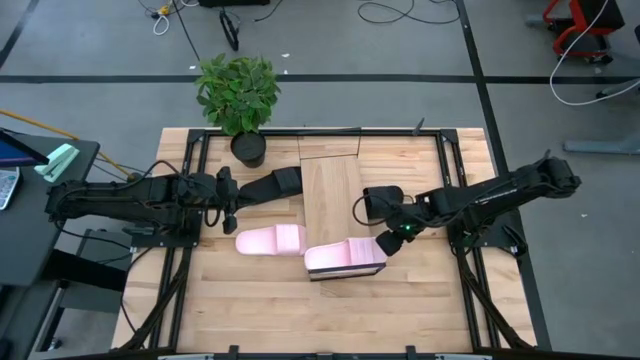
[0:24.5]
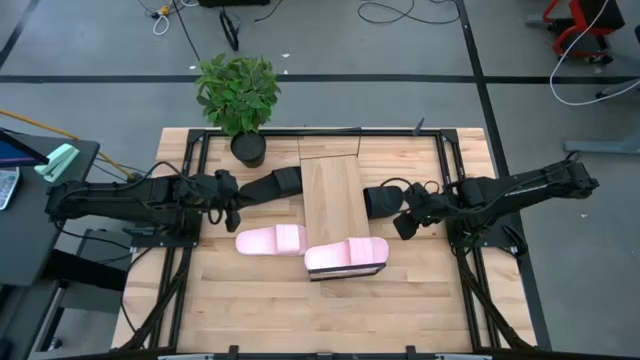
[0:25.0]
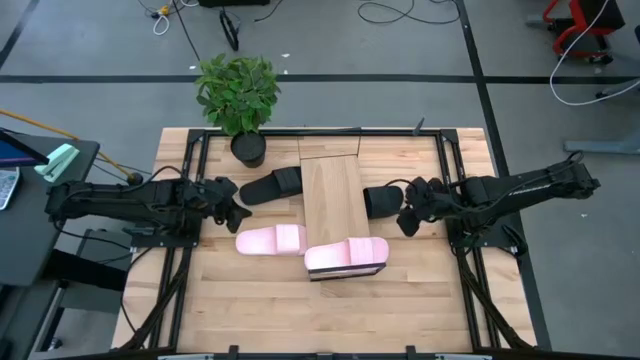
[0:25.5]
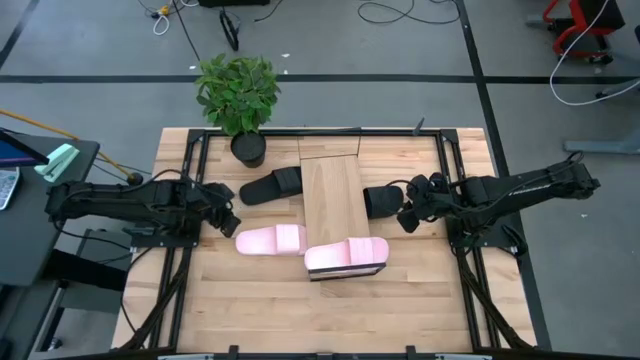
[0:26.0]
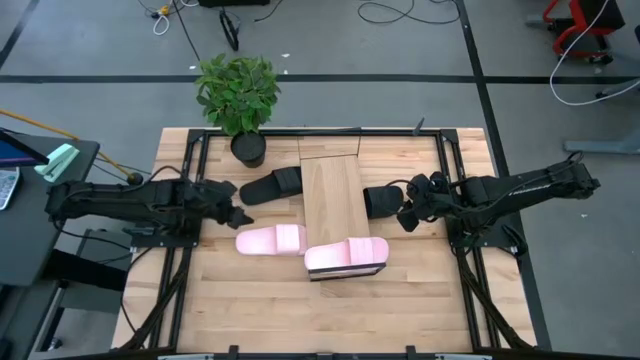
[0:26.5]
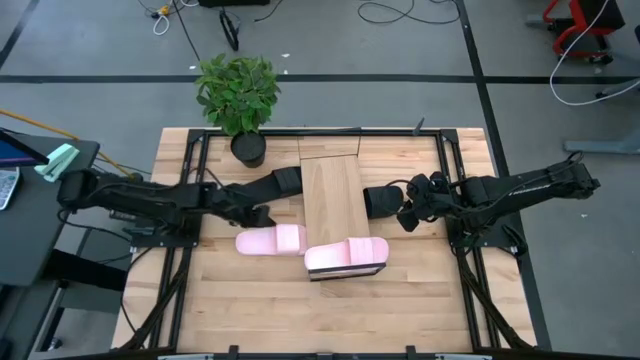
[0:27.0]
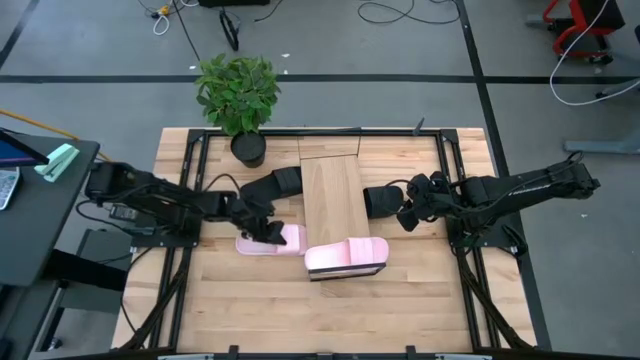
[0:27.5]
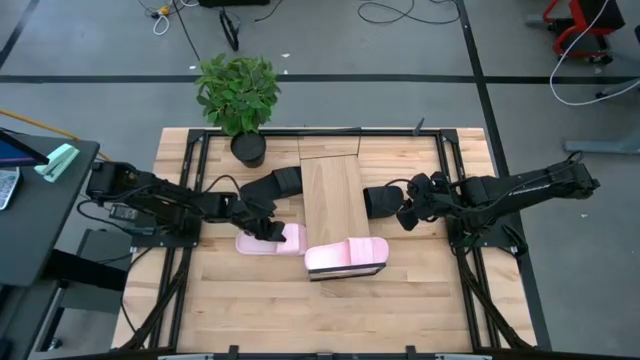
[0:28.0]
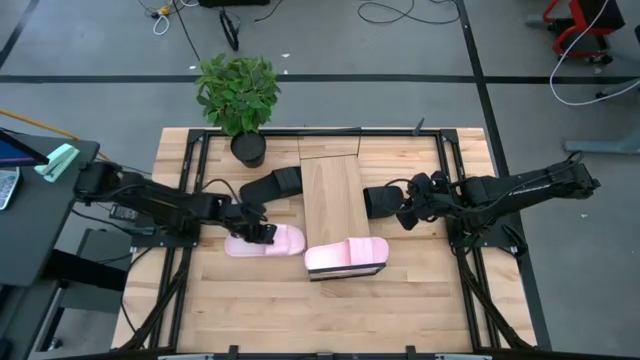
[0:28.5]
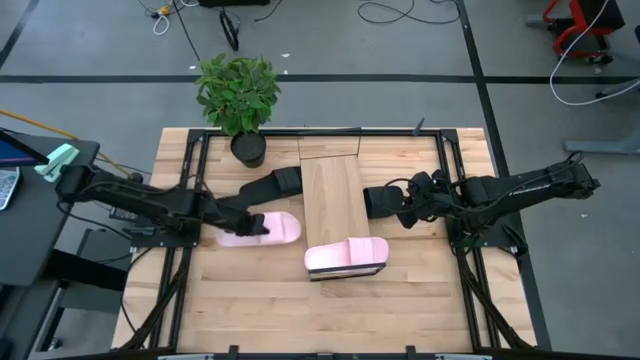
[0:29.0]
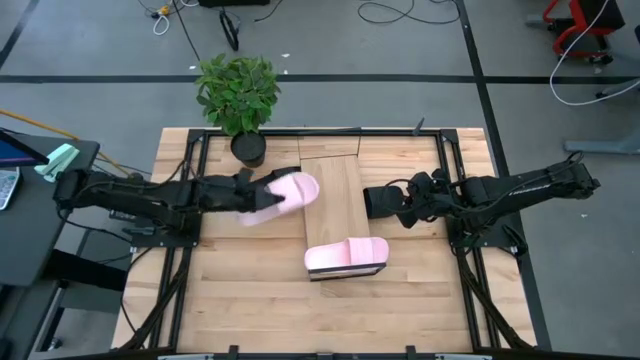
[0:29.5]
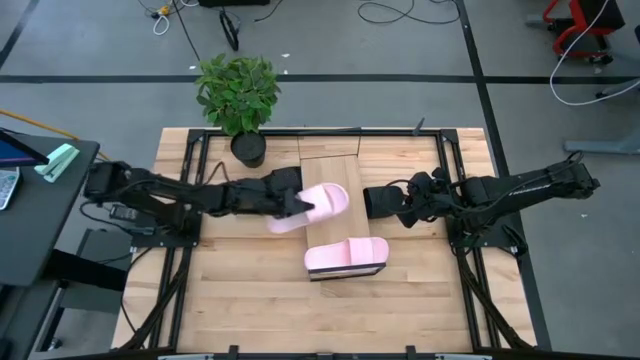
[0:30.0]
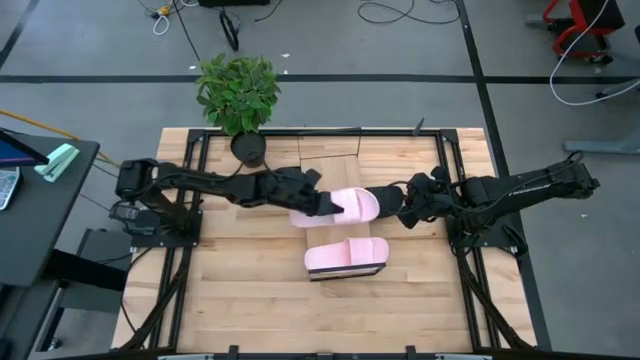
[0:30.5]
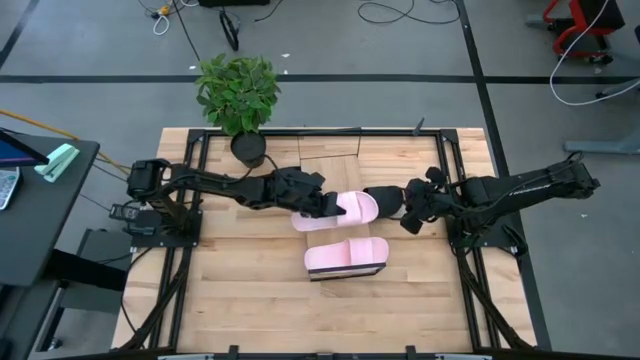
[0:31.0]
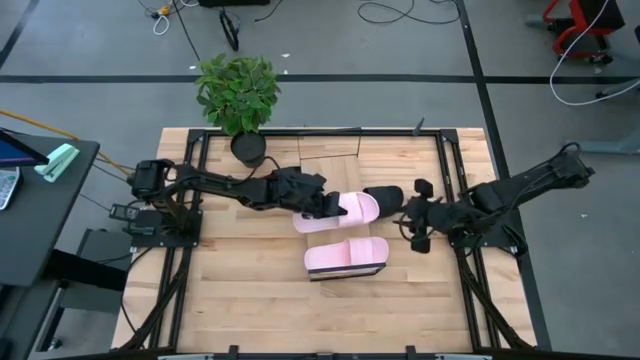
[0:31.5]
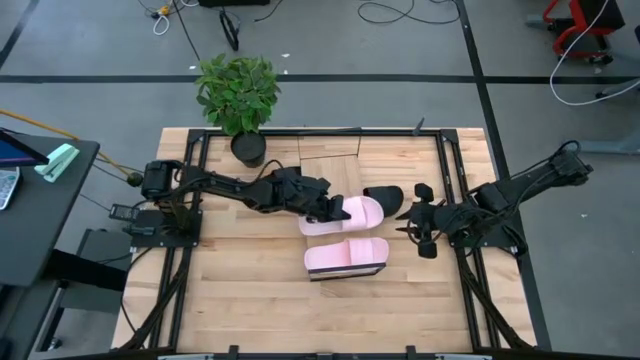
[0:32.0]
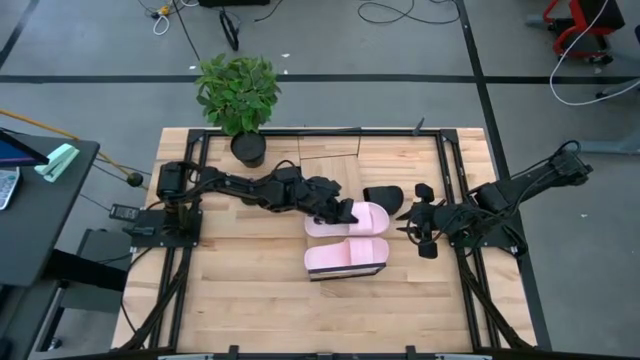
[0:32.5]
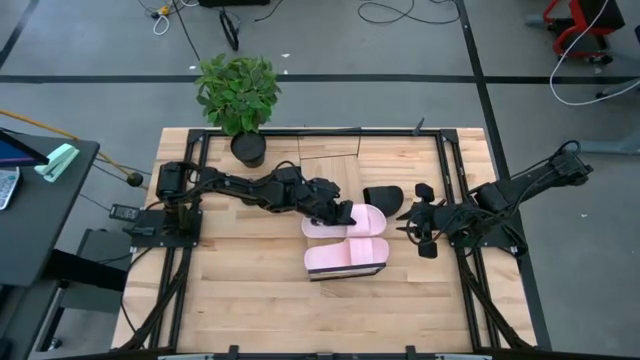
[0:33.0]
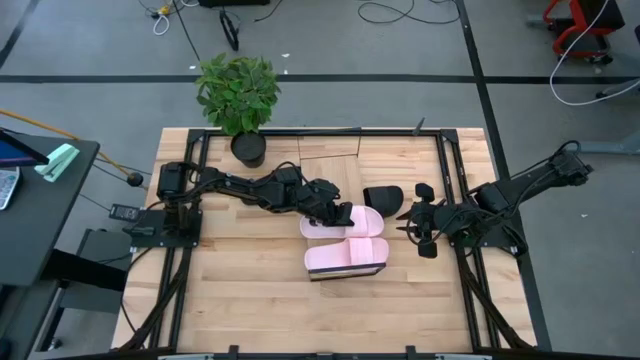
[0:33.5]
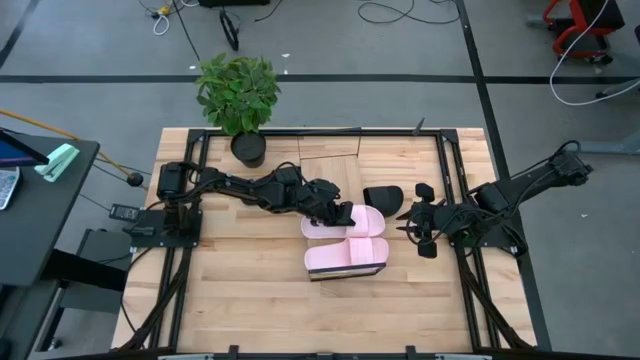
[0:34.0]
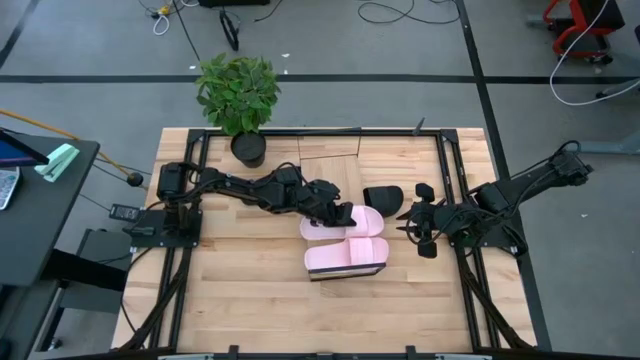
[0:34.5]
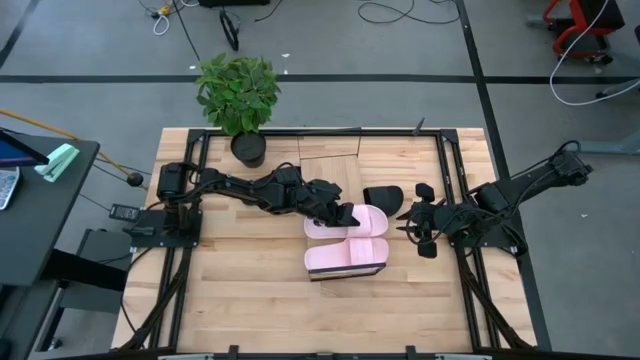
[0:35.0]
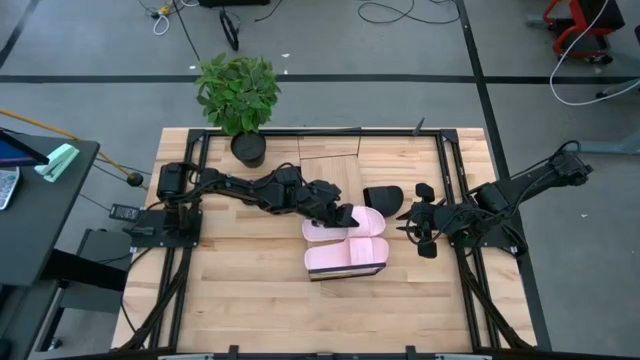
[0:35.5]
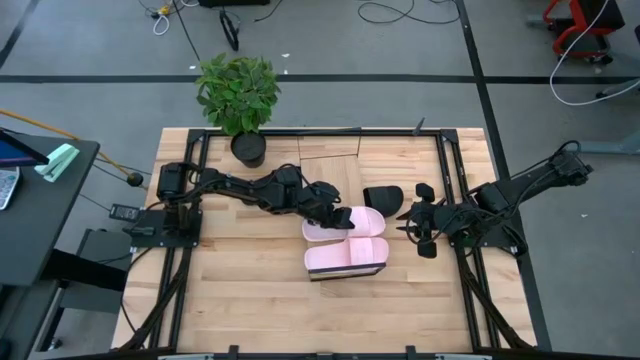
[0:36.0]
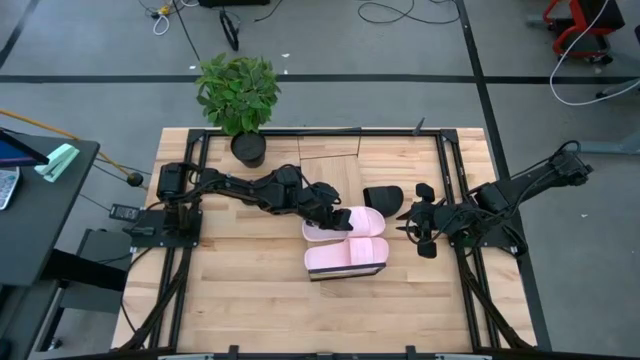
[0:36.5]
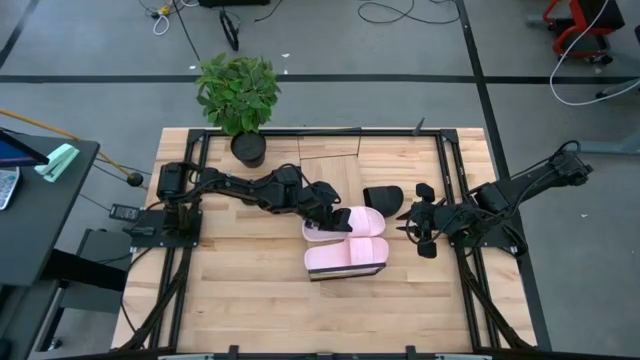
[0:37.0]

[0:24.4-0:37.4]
Task: Pick and place slides into the shelf
Put the pink slide on the shelf

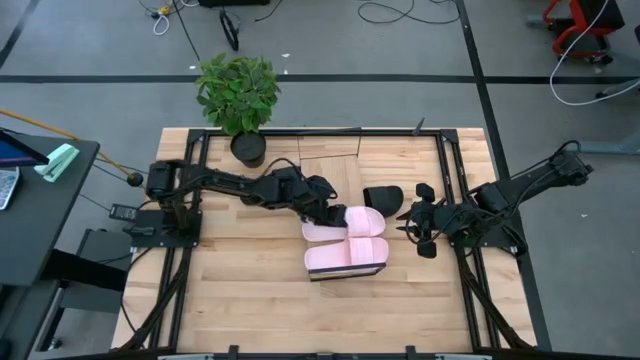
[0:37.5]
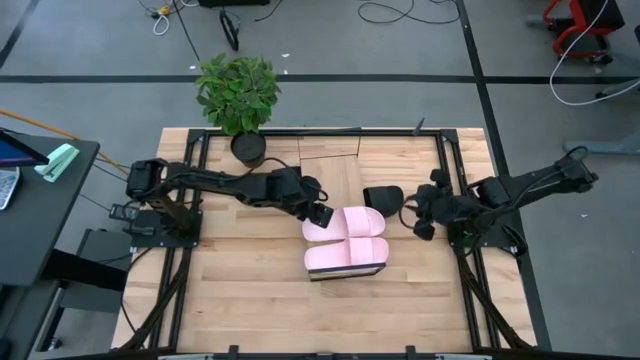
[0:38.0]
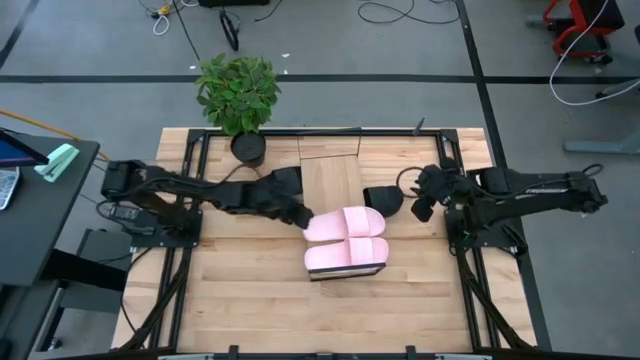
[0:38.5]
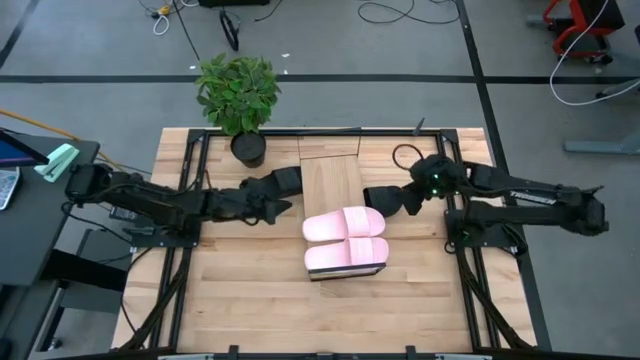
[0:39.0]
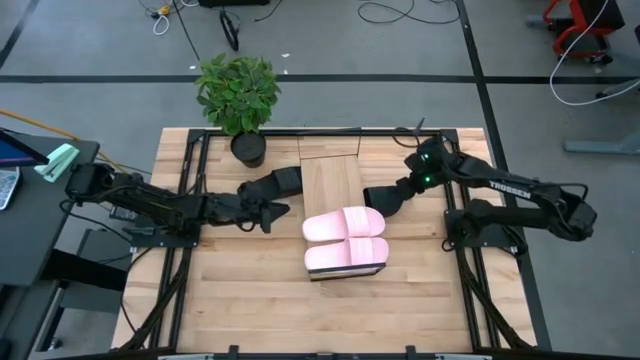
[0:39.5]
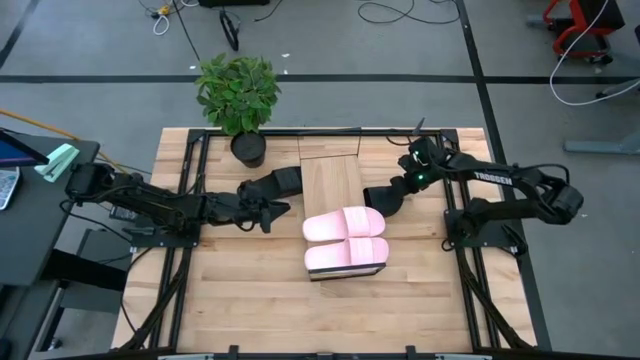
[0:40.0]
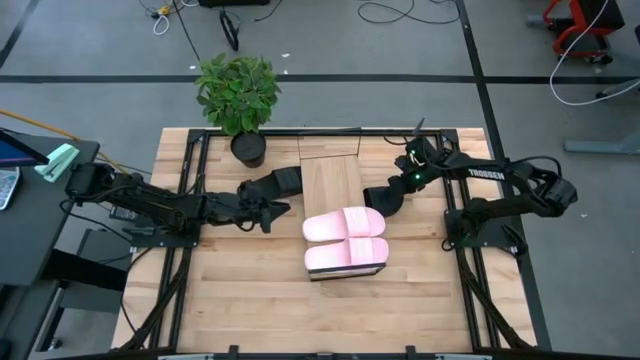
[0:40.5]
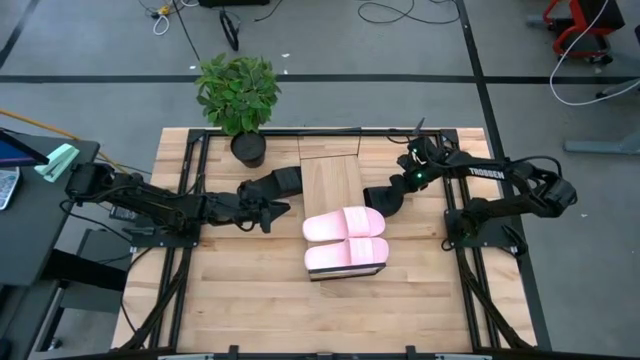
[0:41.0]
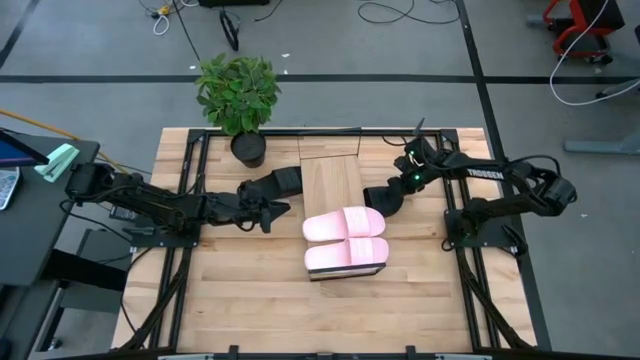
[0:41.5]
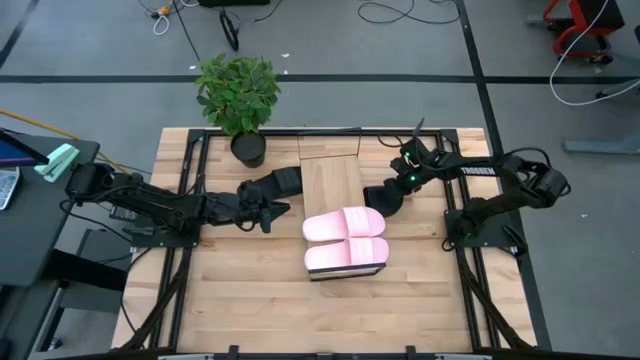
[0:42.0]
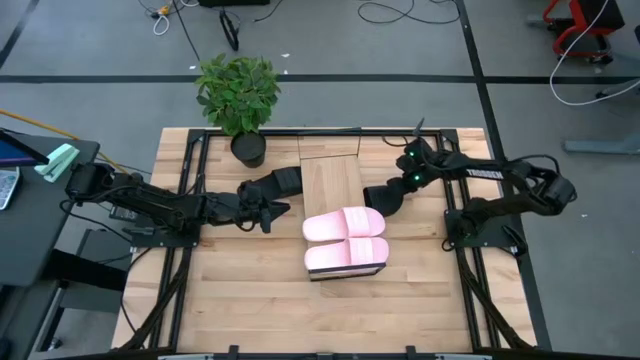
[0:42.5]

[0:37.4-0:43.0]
Put the right black slide on the shelf

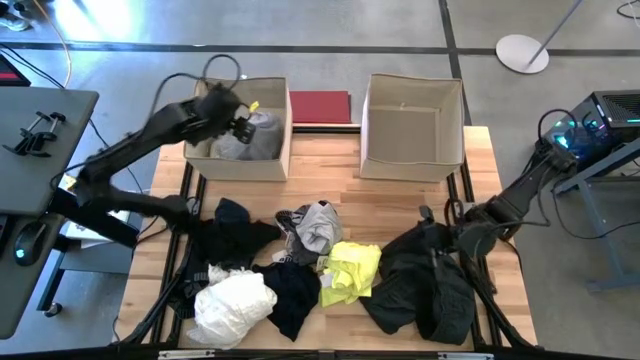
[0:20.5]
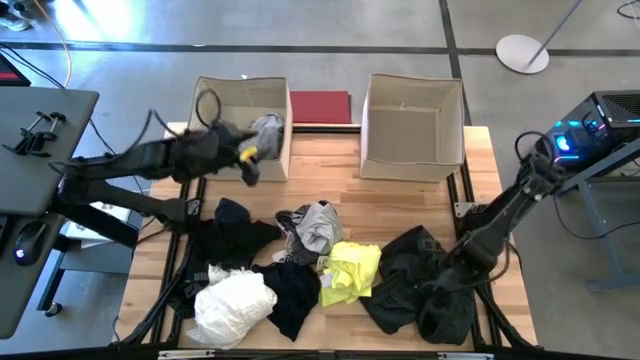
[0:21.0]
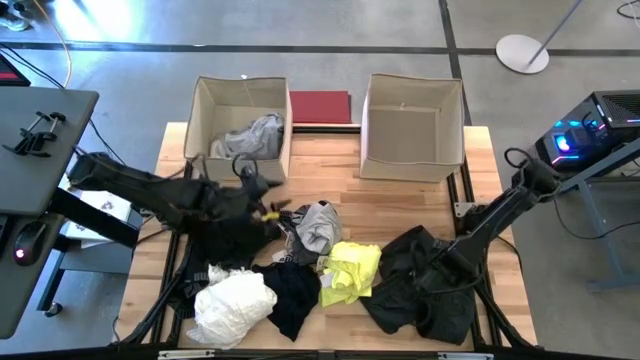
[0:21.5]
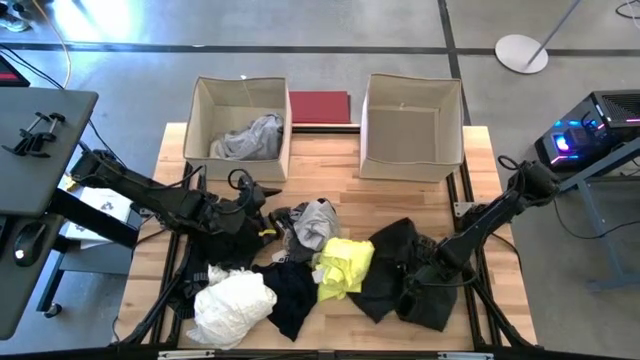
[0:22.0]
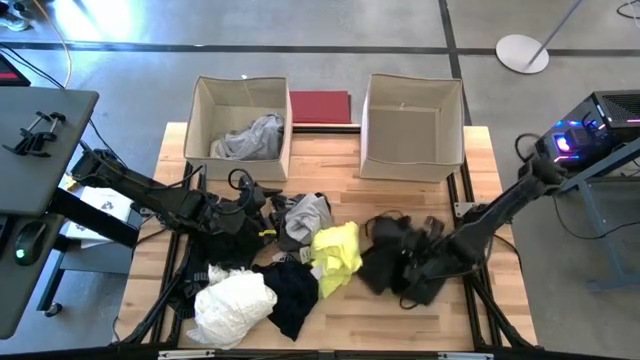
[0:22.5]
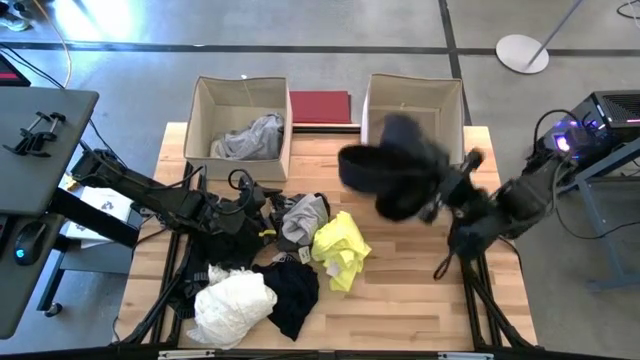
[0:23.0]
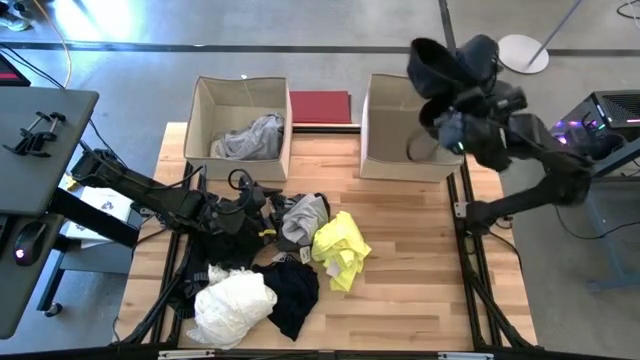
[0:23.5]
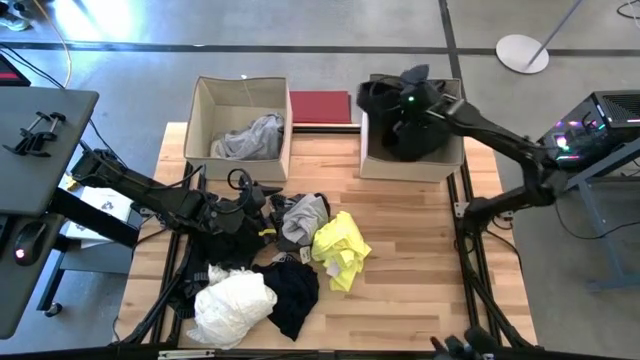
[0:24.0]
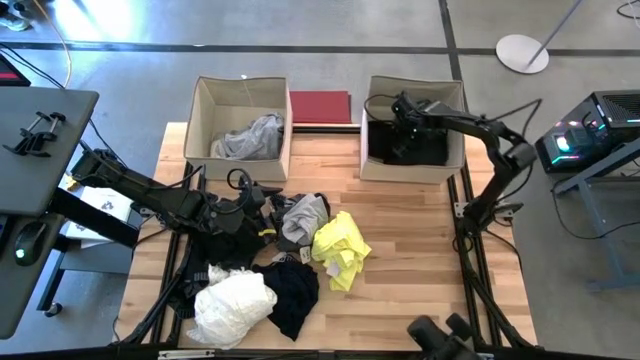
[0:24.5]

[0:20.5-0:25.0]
Task: Sort clothes
Put the black shorts into the brown right laundry organizer
